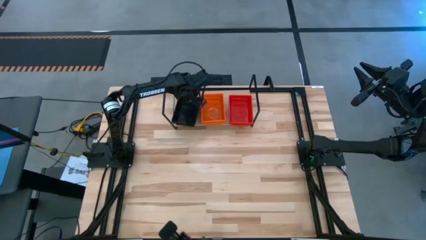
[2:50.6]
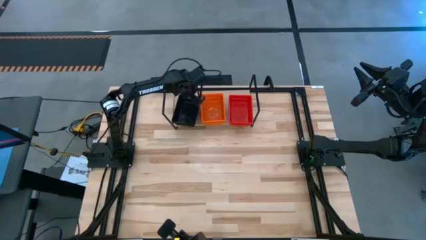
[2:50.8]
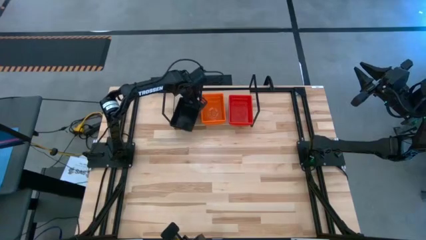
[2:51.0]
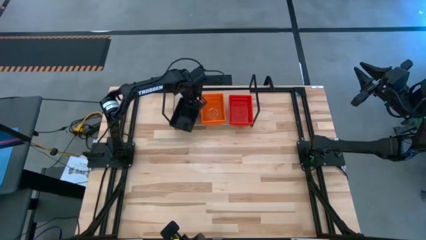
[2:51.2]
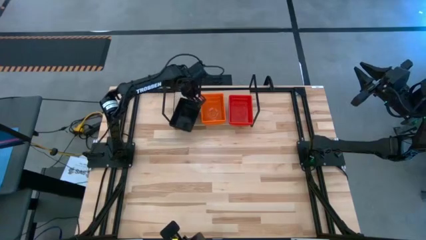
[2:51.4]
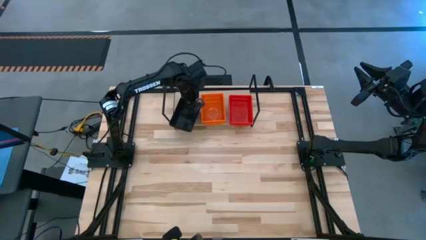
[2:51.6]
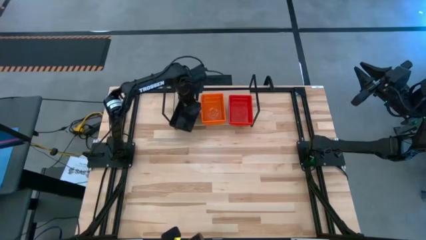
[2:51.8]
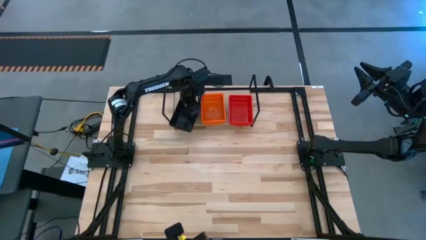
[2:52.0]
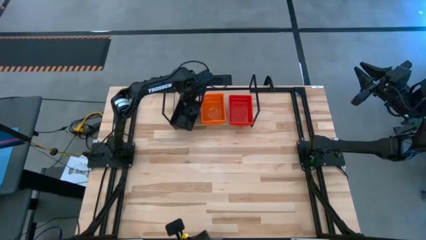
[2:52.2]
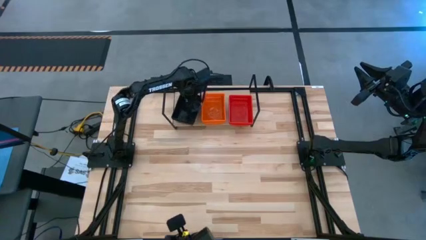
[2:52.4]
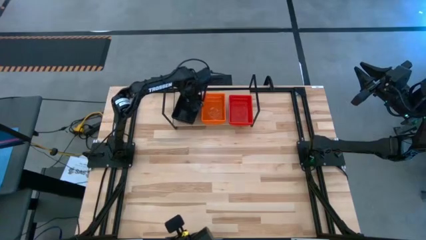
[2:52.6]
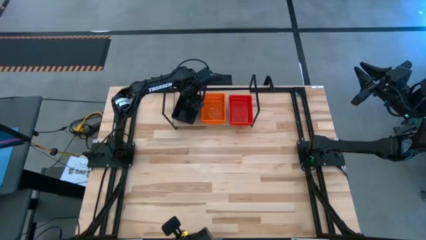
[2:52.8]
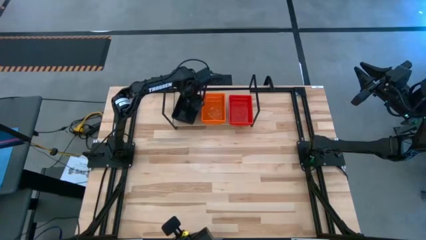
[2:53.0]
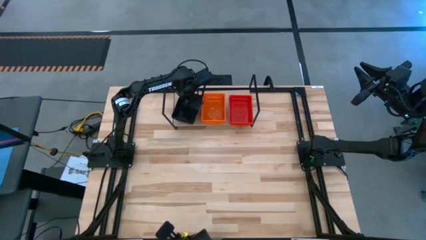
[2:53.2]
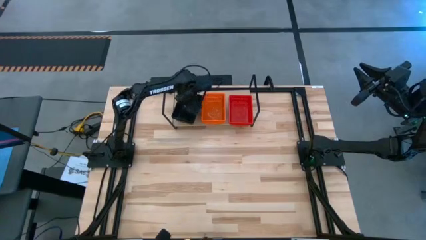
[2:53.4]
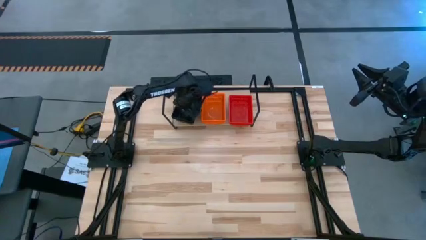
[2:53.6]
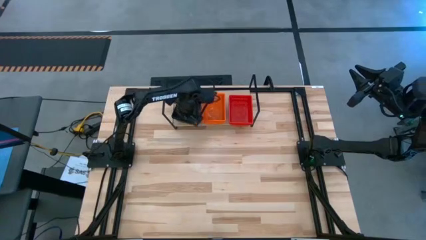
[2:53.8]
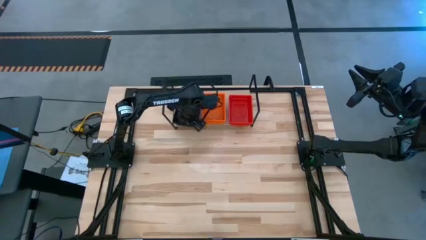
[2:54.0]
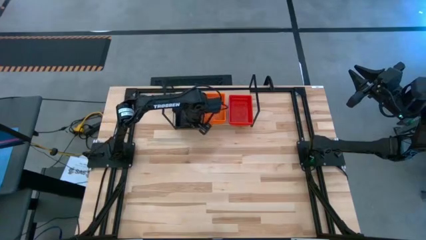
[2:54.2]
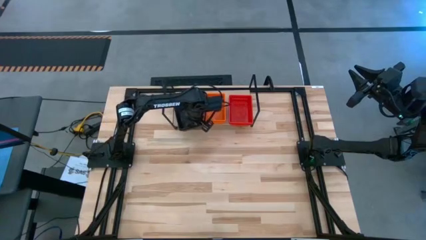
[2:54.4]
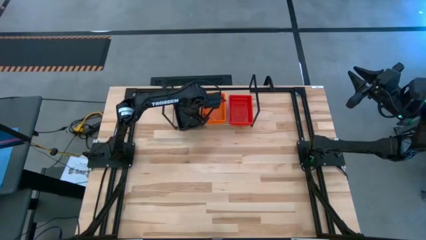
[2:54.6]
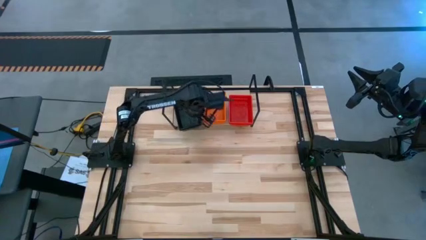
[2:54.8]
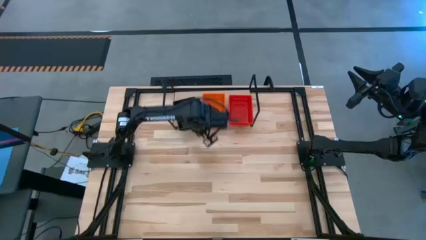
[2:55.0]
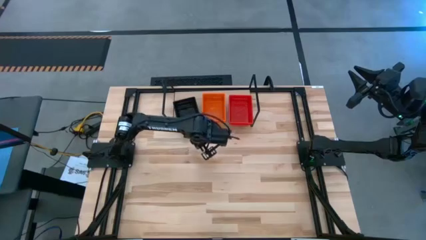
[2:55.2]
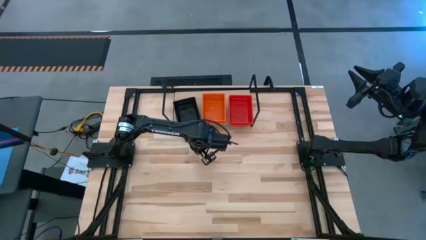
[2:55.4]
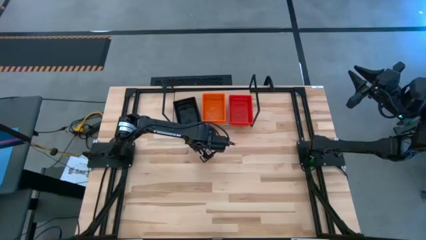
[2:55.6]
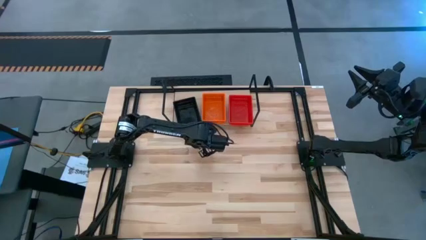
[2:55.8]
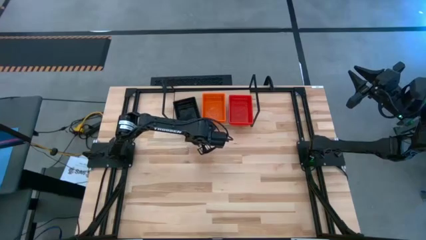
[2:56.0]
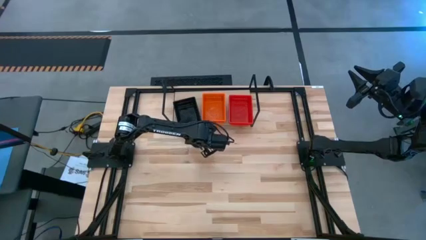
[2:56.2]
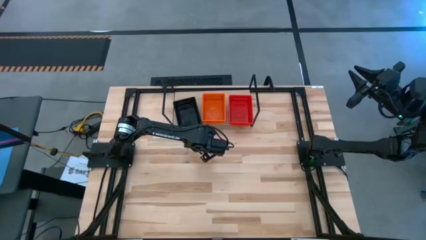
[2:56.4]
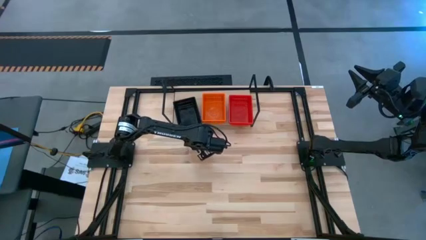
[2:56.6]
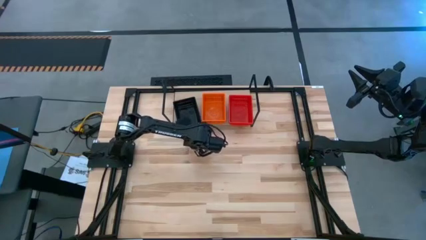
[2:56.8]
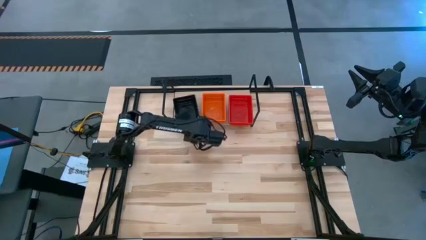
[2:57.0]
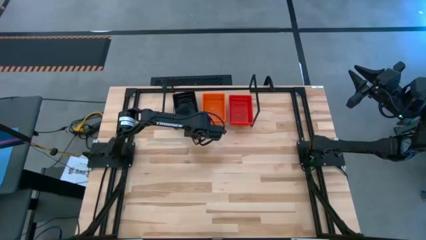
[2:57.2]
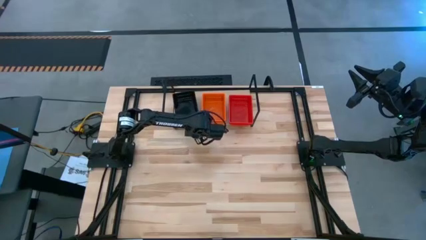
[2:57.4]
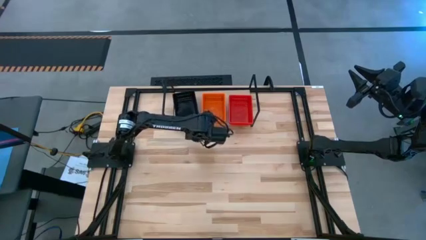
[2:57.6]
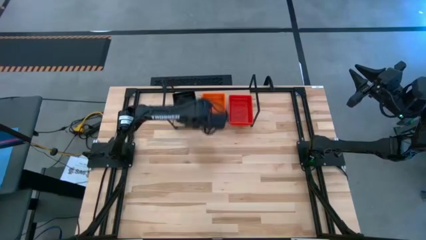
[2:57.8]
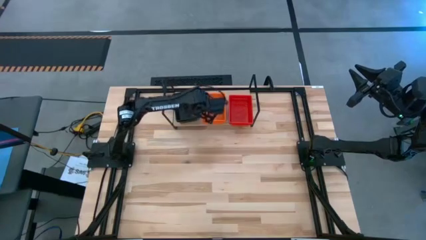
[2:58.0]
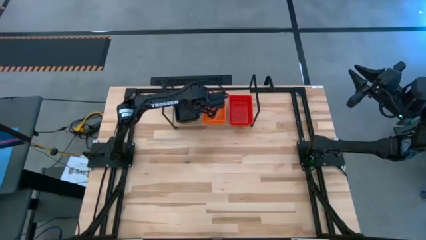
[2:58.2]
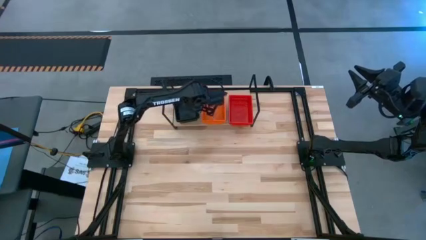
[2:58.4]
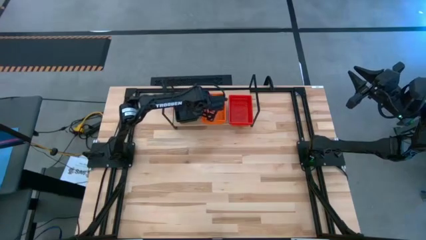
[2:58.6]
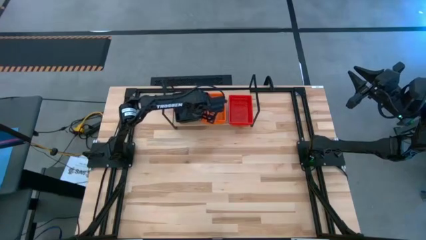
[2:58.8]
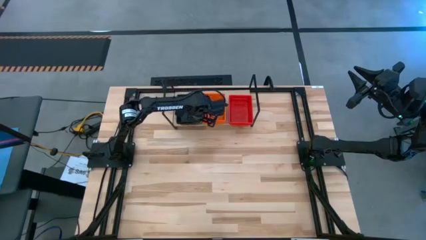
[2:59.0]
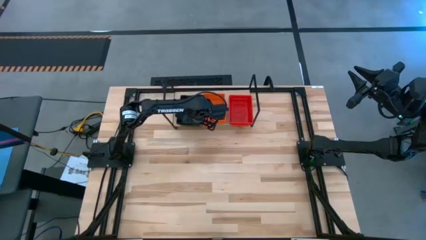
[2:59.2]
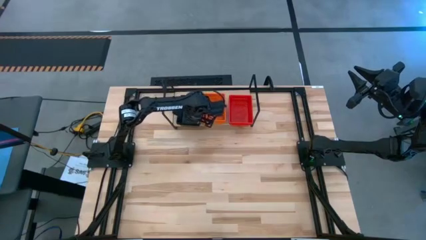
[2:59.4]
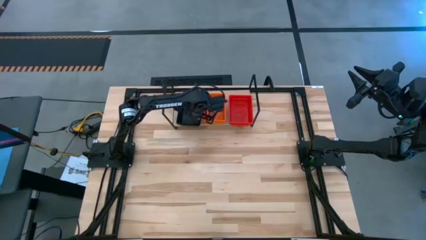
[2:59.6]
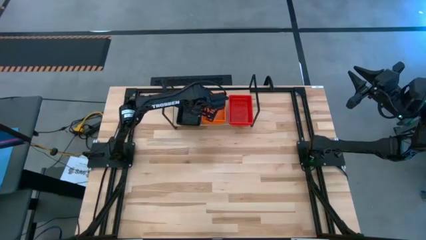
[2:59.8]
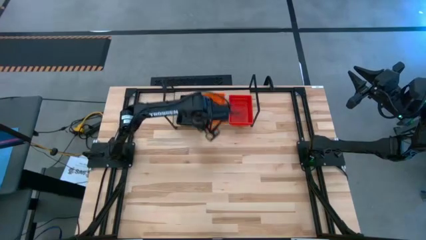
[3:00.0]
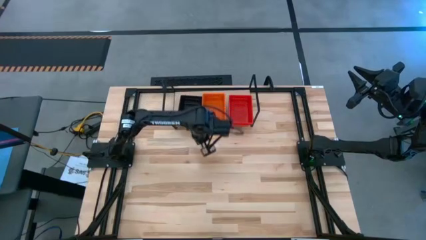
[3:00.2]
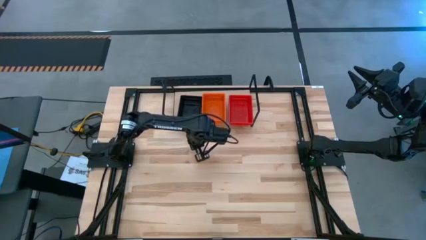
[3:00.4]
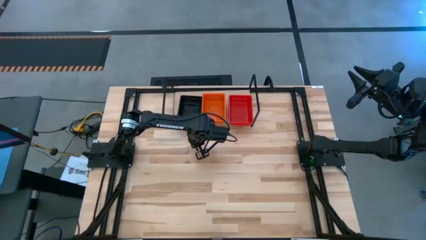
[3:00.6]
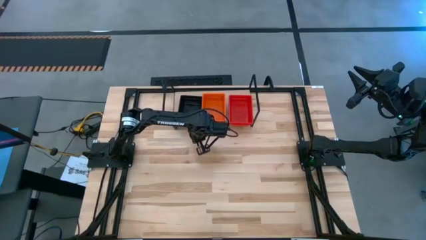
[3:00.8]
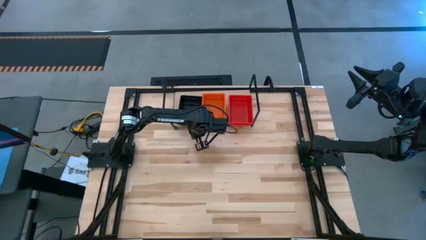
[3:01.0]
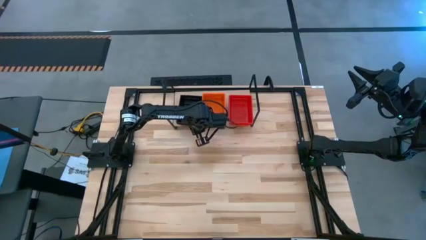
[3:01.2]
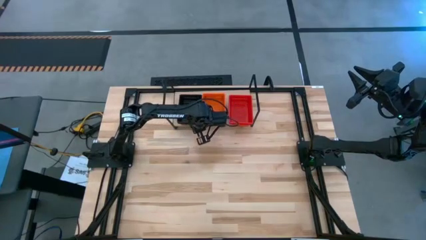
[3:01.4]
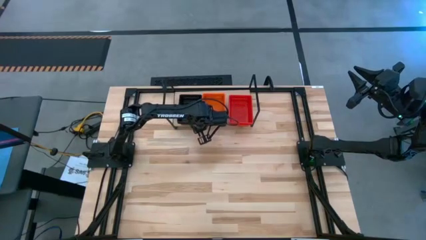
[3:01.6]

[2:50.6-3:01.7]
Task: Stack baskets on shelf by color
Adjust all the stacked bins on the shelf
